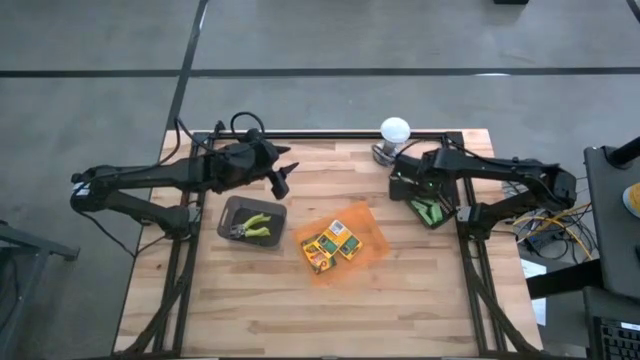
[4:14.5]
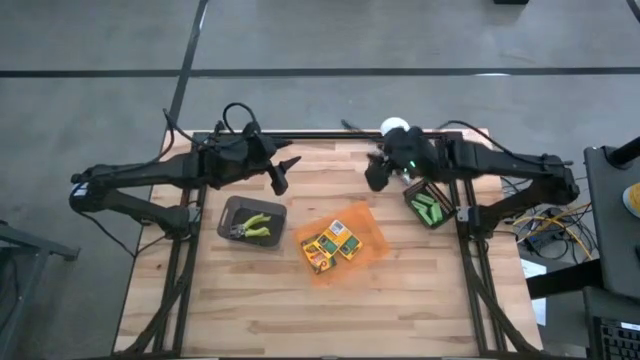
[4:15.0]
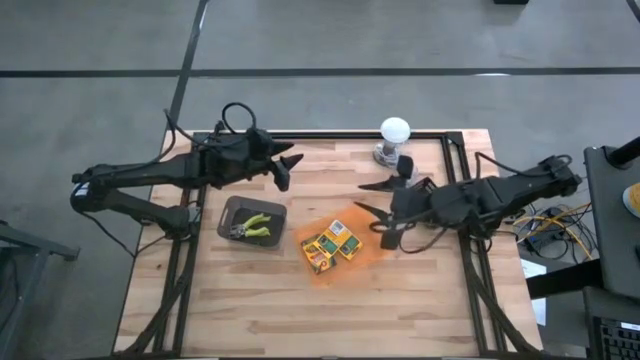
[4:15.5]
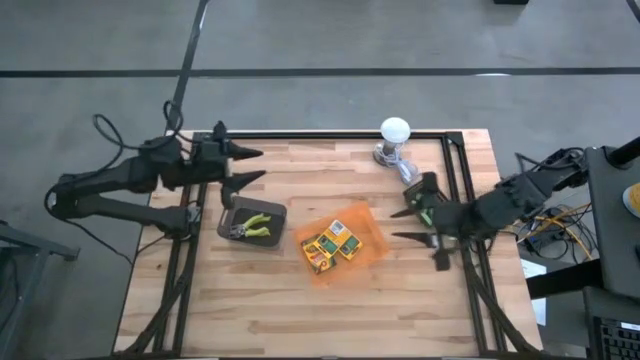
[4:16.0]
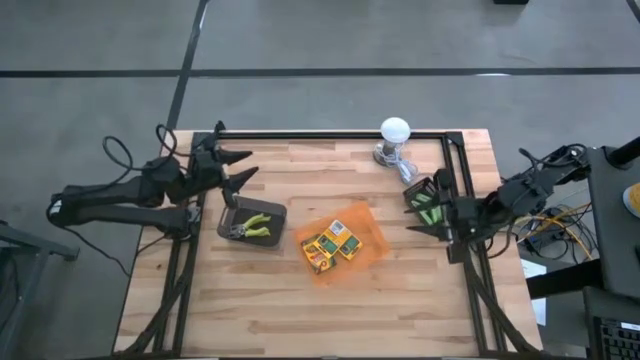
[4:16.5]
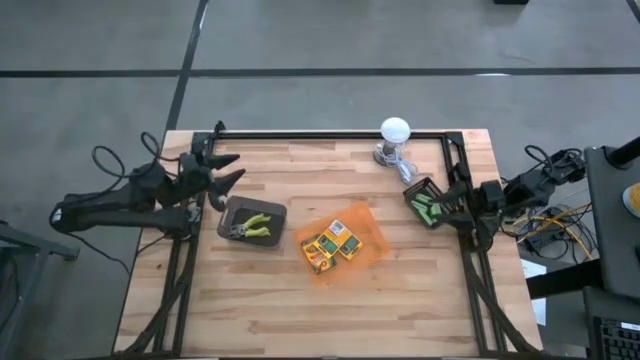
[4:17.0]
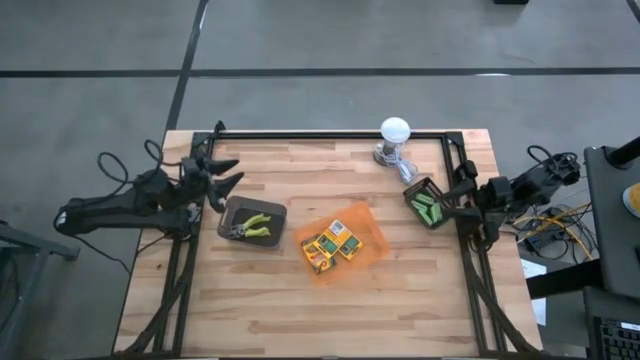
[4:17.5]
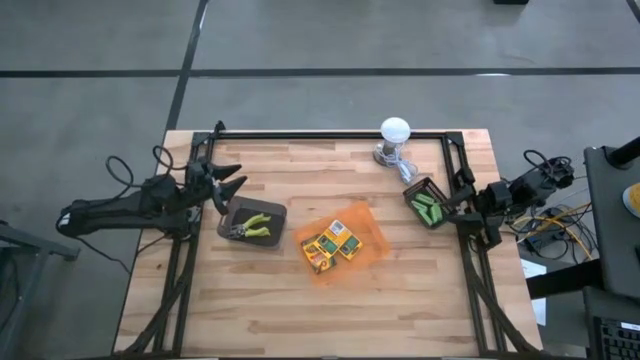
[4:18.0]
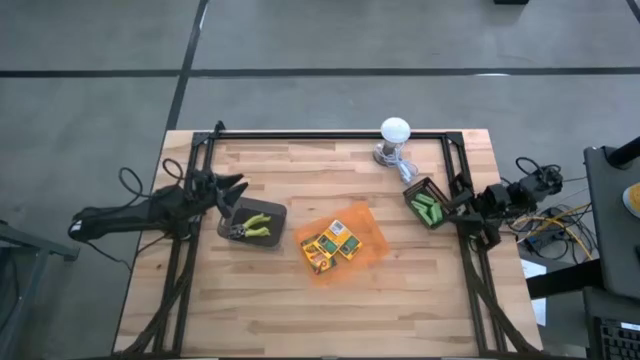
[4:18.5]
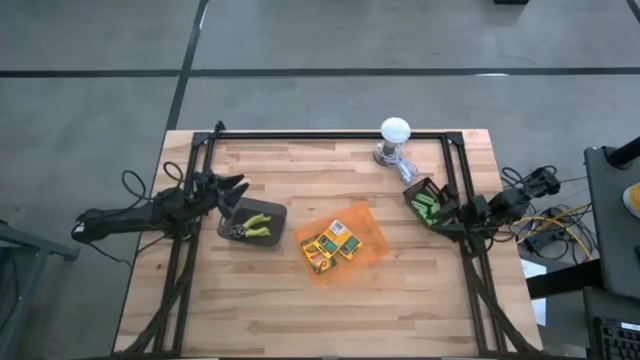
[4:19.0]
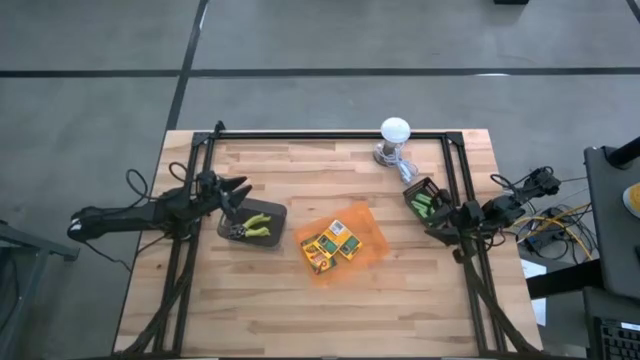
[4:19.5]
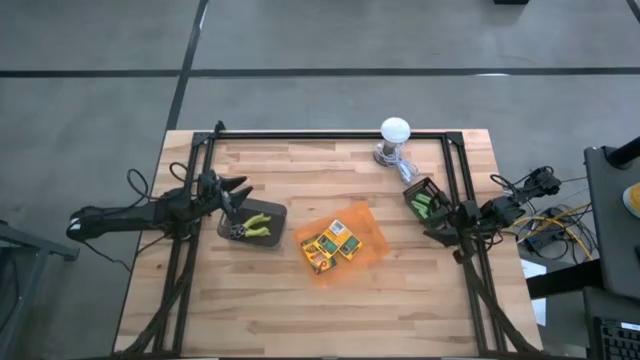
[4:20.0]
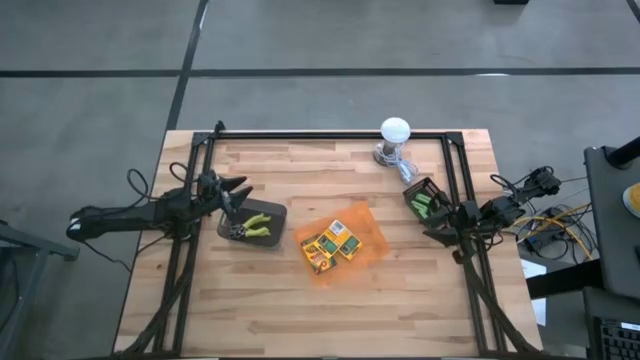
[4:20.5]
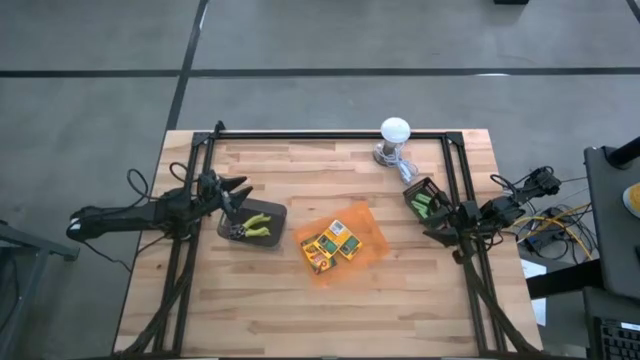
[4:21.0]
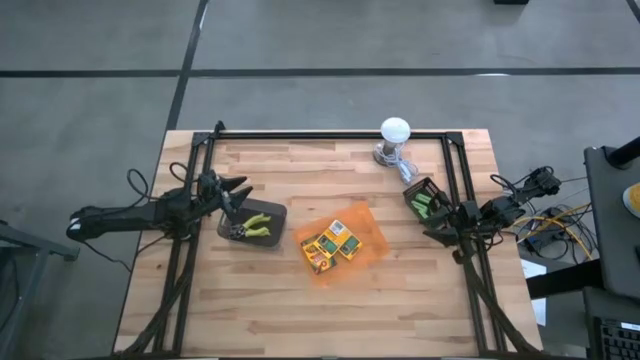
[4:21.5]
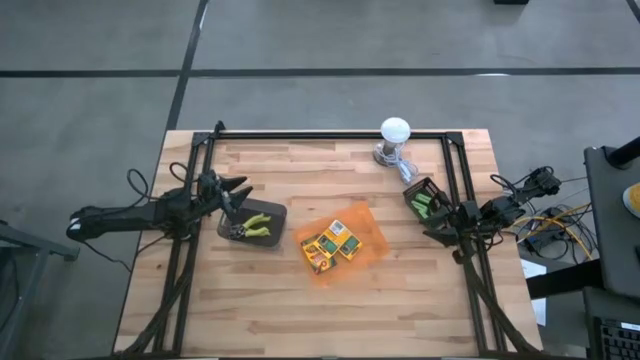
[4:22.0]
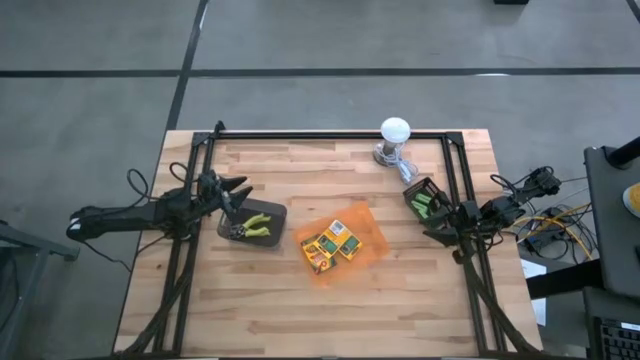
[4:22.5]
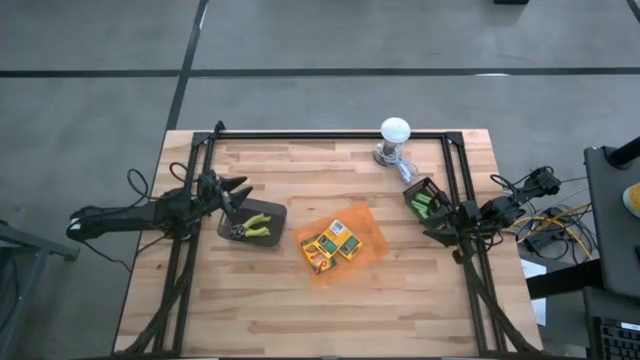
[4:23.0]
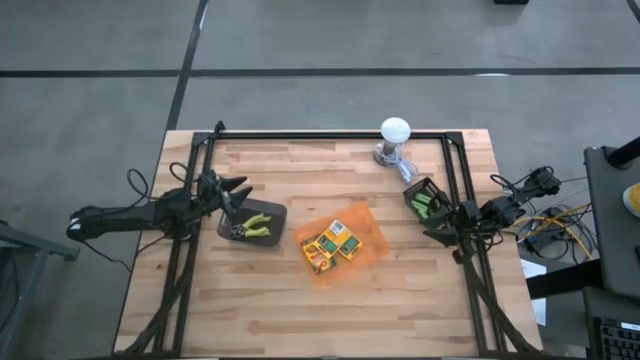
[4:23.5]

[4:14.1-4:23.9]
Task: Pick & Place School Supplies
Return to Home Position

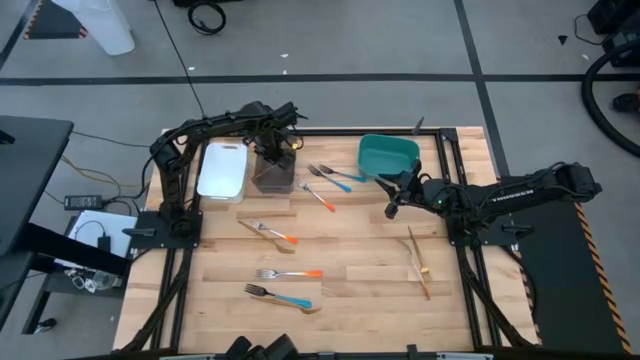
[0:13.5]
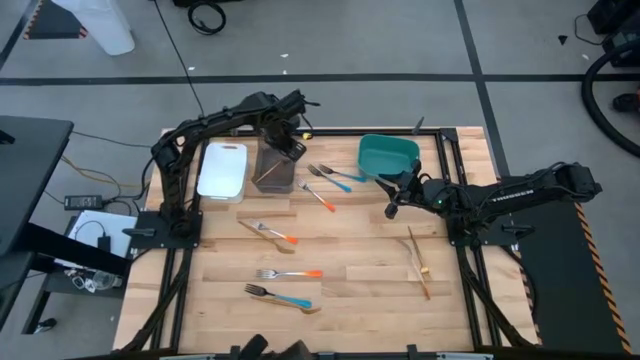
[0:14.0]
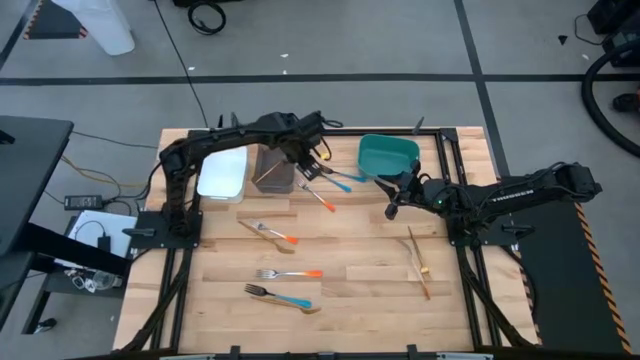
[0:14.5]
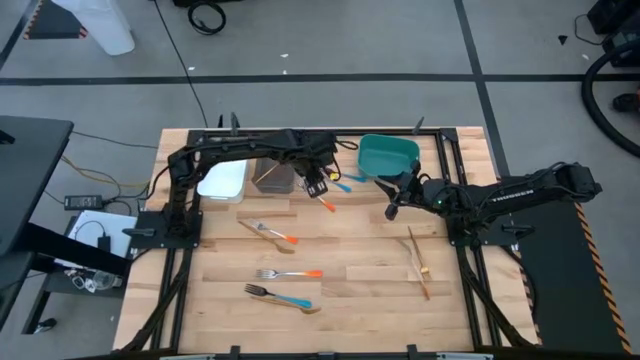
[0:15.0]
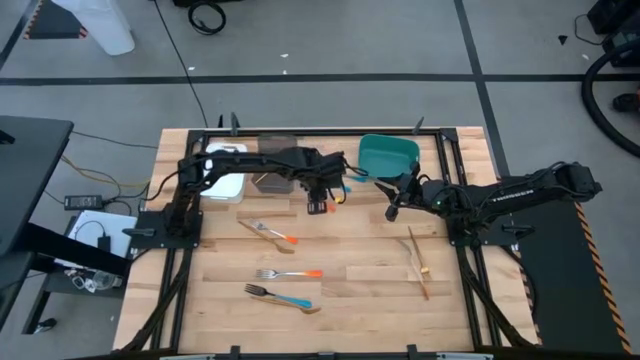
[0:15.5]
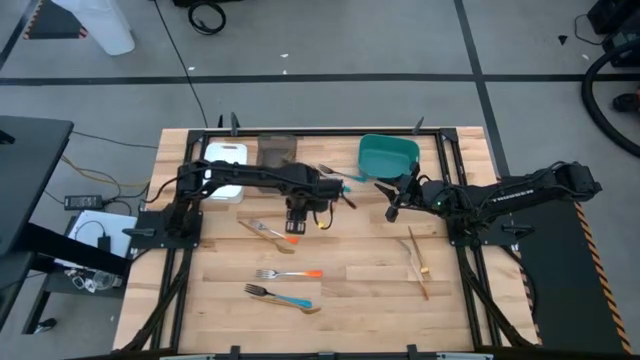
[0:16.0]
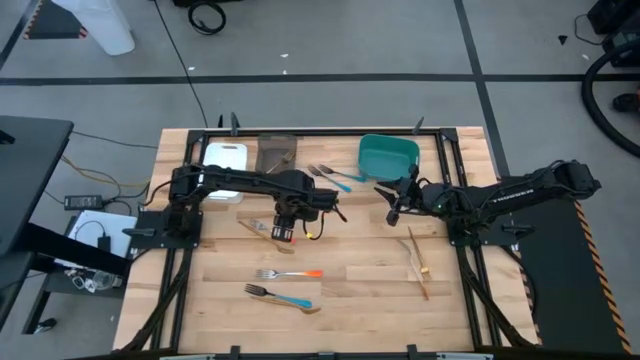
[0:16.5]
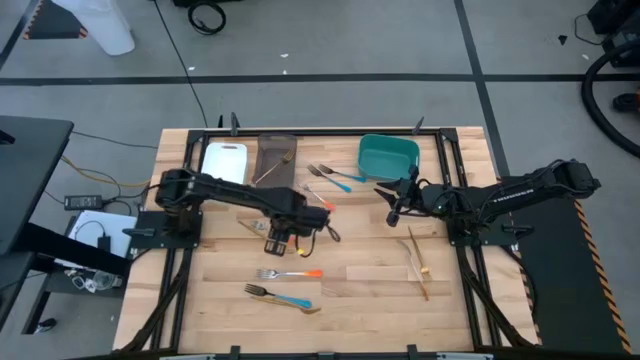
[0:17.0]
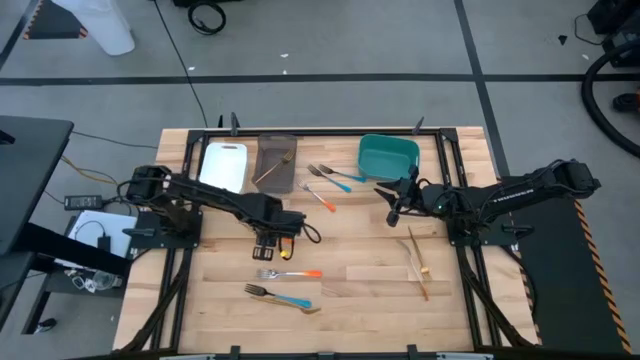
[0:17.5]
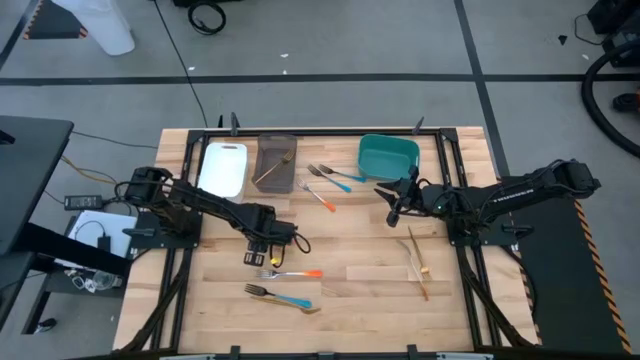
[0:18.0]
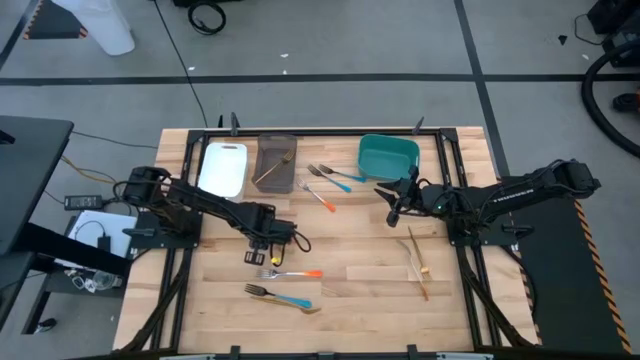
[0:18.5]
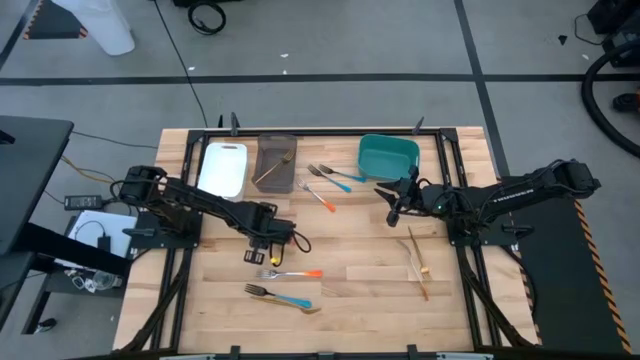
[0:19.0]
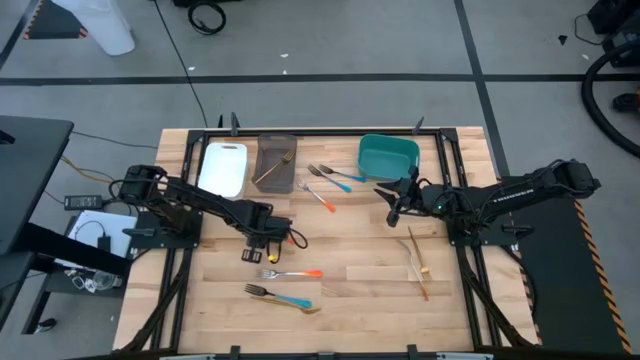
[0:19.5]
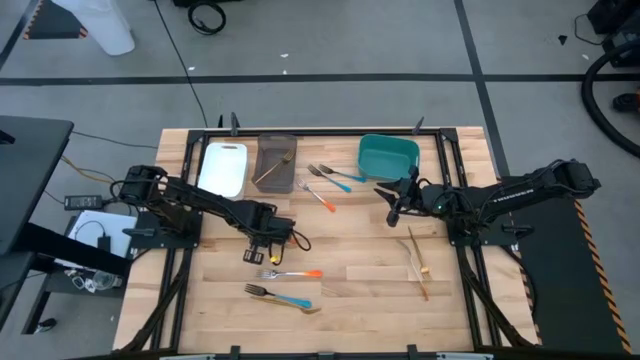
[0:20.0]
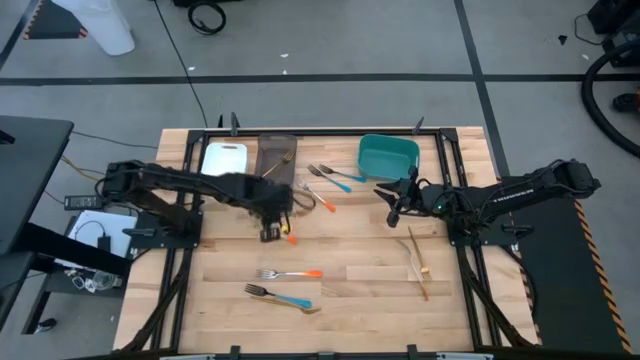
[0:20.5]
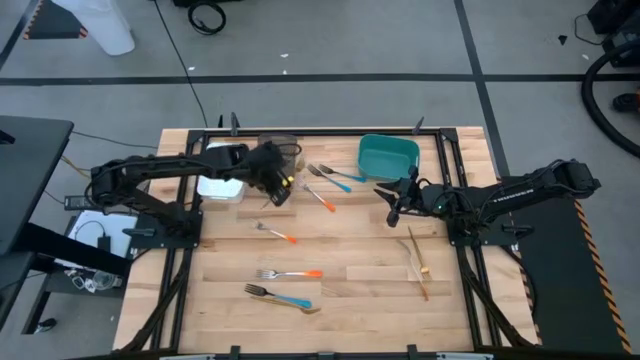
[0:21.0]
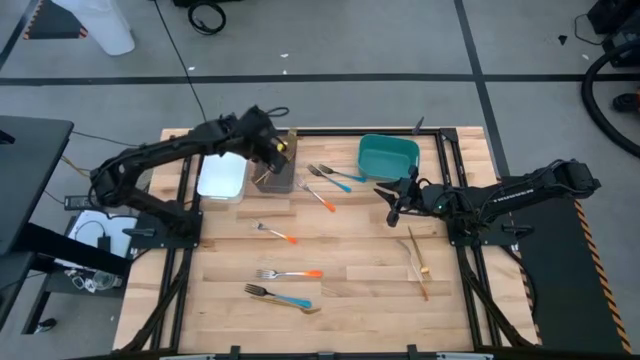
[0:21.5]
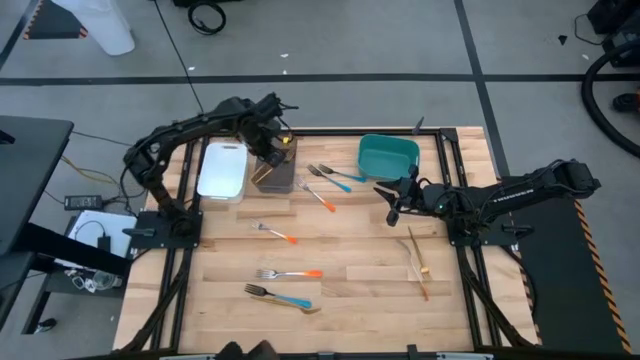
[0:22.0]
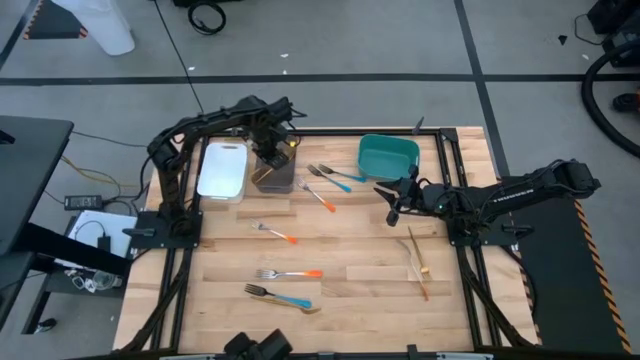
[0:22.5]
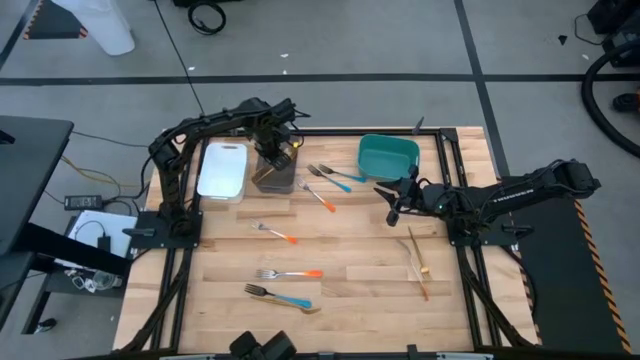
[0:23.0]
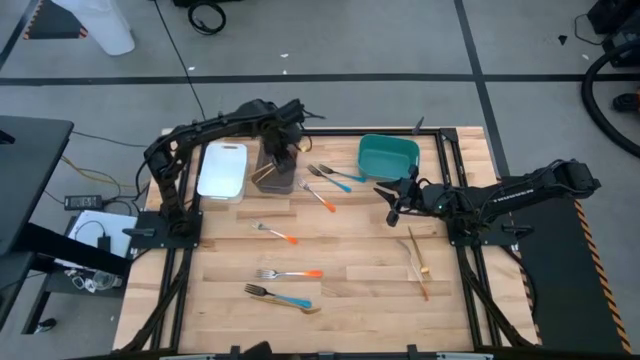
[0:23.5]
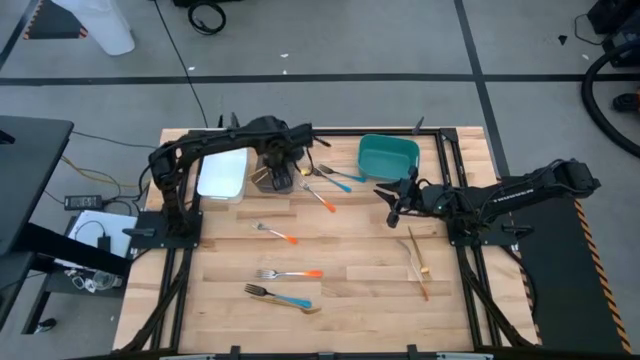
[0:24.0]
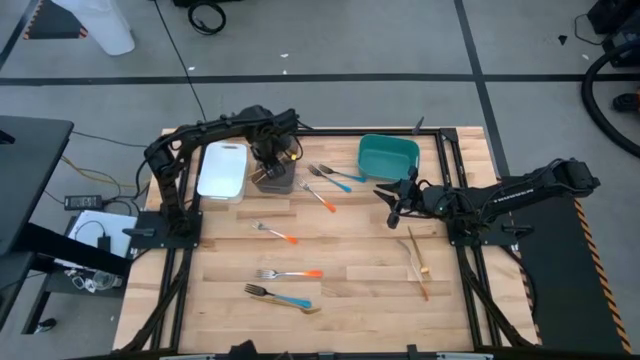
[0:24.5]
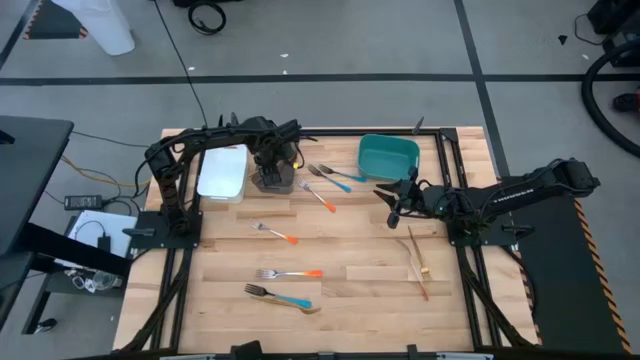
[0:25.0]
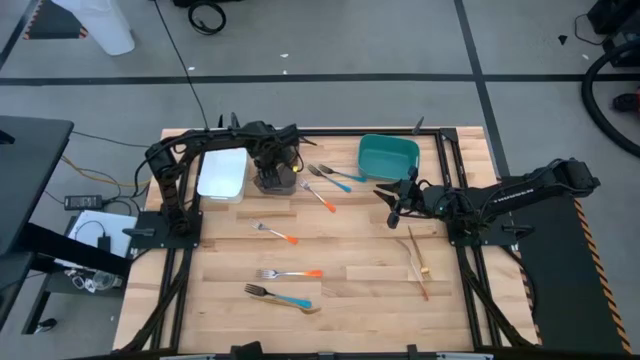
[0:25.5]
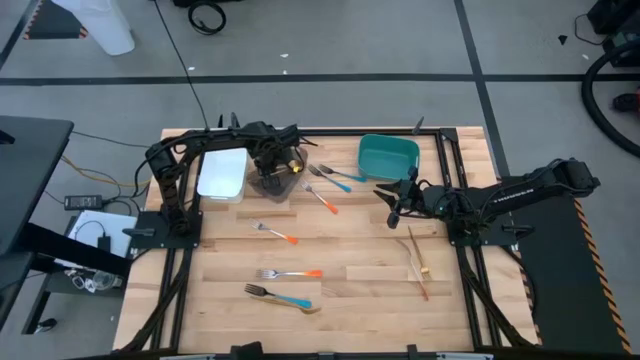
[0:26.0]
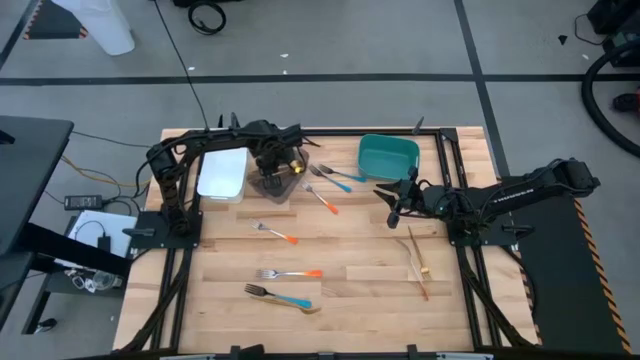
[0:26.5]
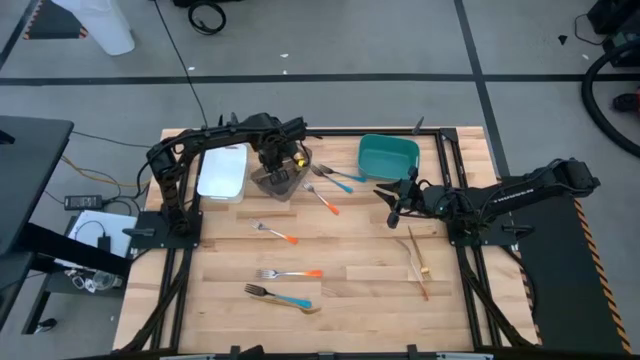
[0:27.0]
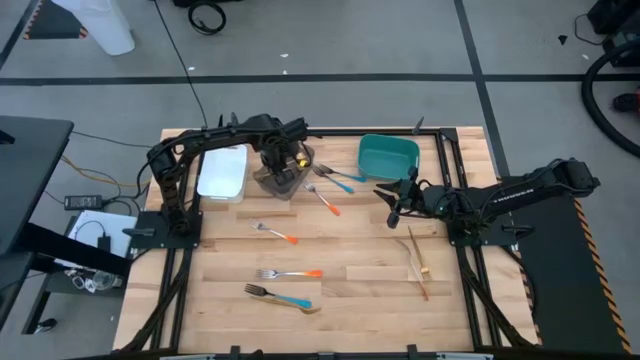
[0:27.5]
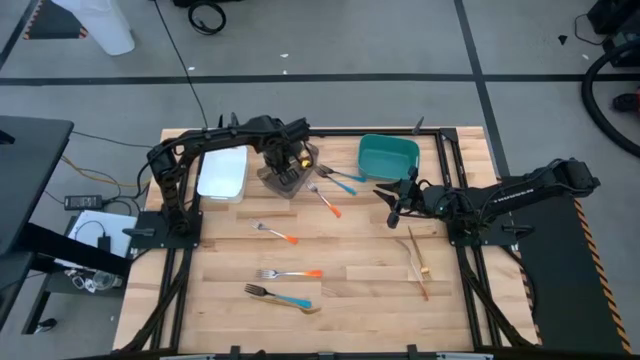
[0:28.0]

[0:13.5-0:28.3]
Task: Sort silverware by color (type)
Put the top left gold fork into the black bin
